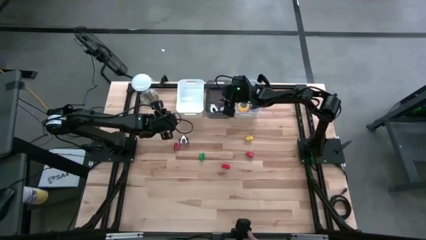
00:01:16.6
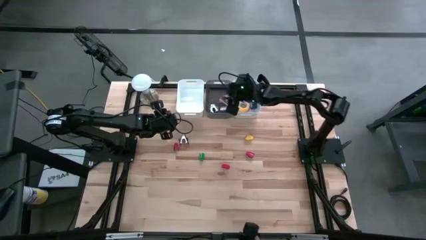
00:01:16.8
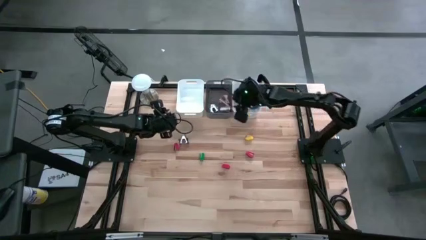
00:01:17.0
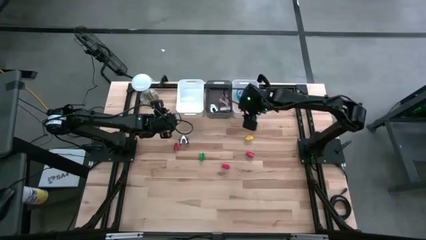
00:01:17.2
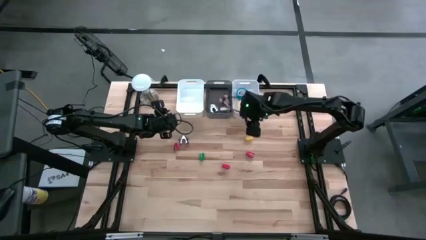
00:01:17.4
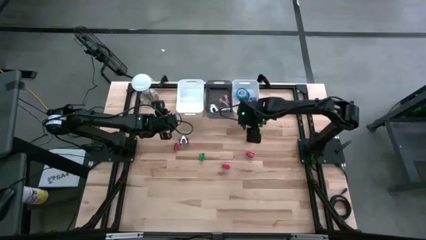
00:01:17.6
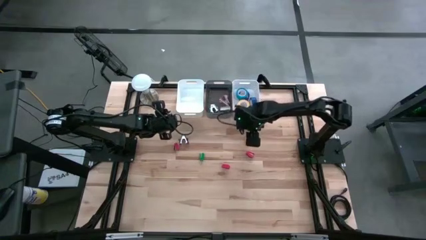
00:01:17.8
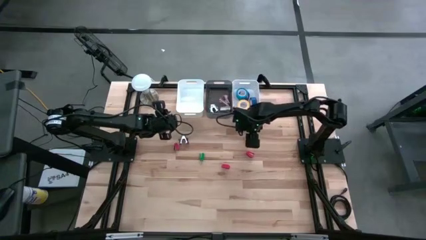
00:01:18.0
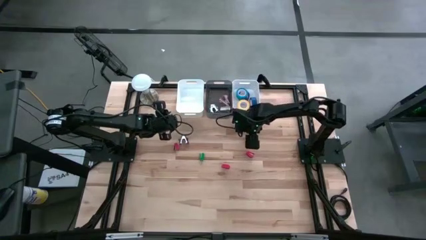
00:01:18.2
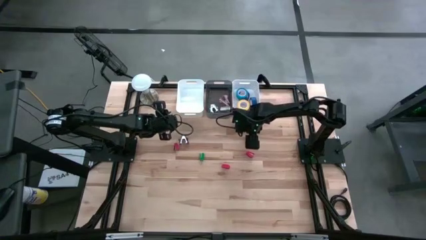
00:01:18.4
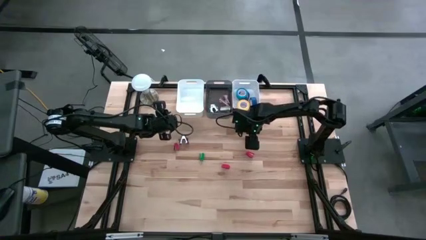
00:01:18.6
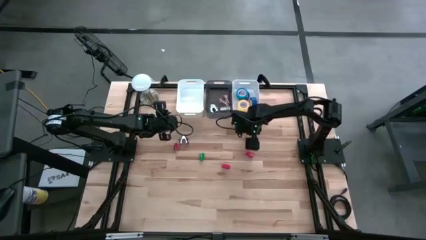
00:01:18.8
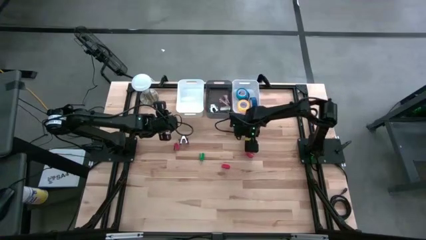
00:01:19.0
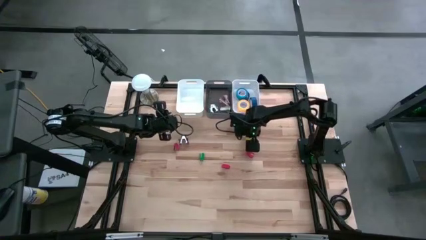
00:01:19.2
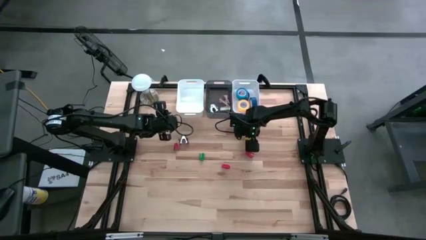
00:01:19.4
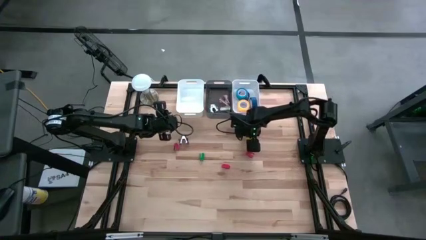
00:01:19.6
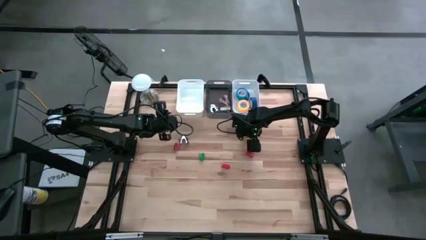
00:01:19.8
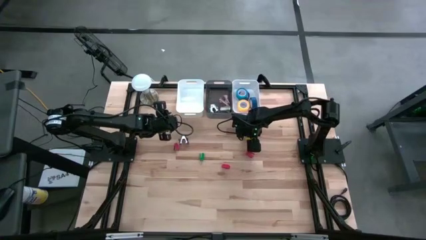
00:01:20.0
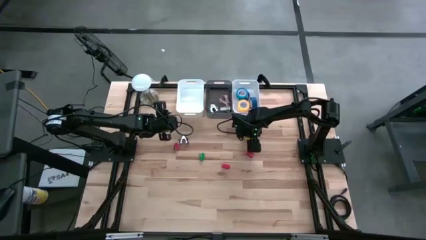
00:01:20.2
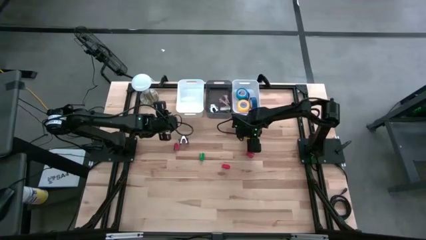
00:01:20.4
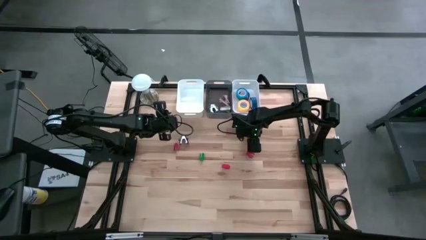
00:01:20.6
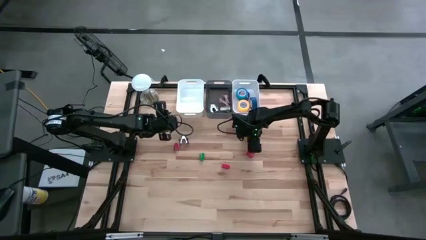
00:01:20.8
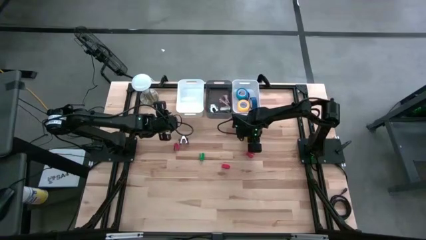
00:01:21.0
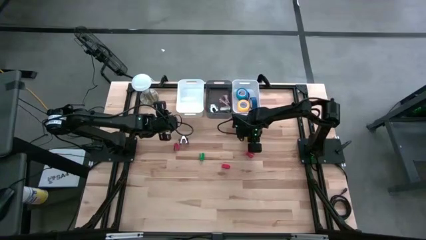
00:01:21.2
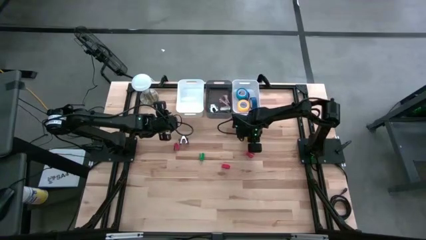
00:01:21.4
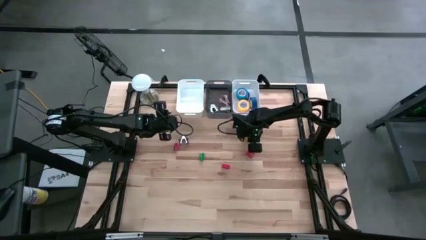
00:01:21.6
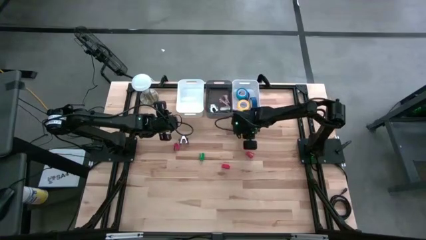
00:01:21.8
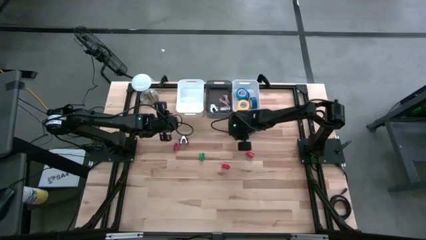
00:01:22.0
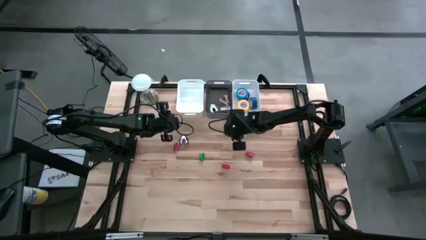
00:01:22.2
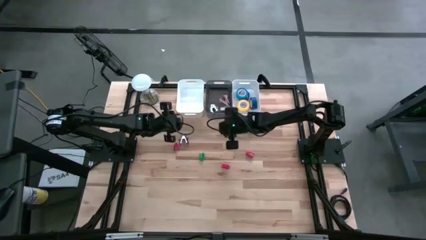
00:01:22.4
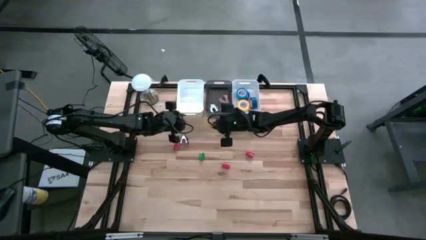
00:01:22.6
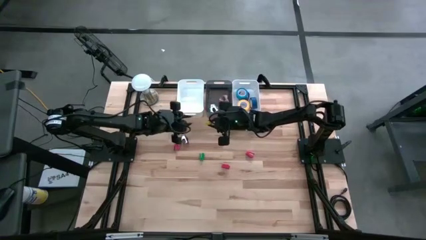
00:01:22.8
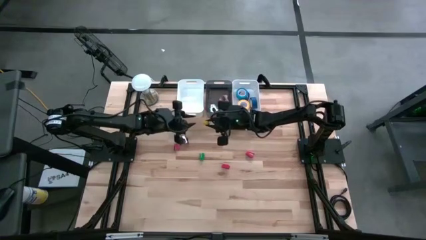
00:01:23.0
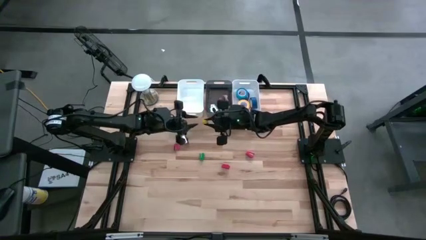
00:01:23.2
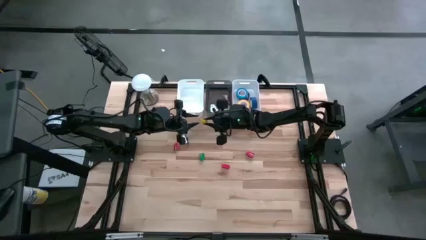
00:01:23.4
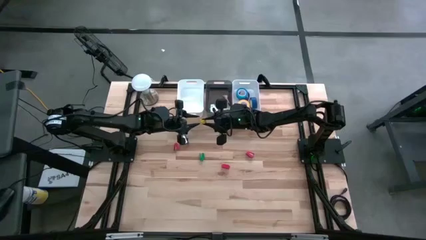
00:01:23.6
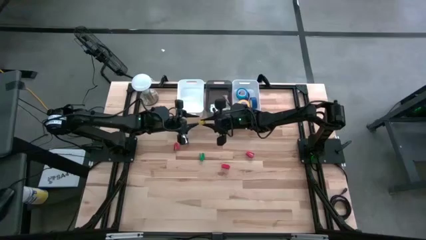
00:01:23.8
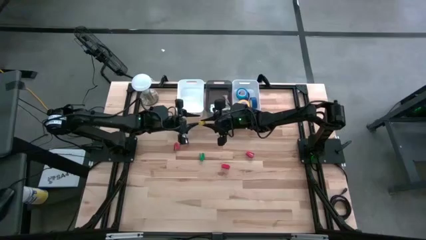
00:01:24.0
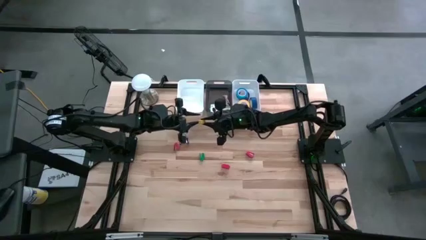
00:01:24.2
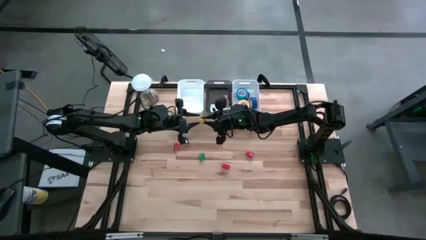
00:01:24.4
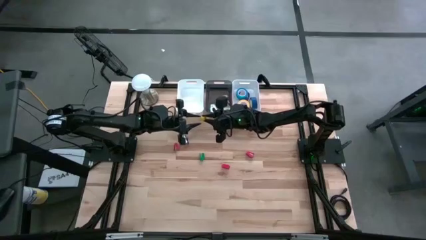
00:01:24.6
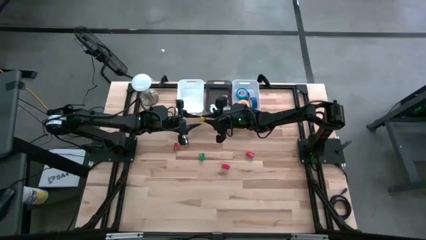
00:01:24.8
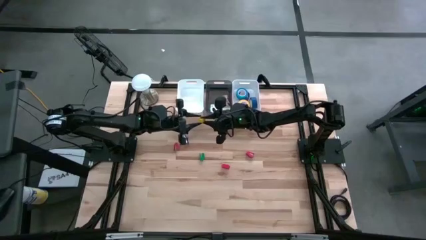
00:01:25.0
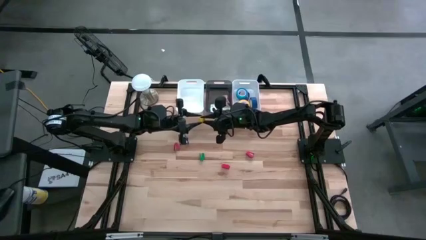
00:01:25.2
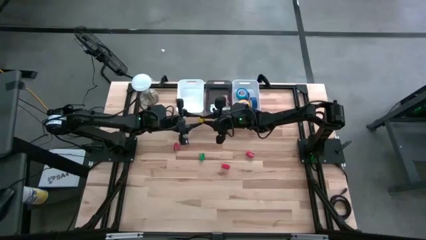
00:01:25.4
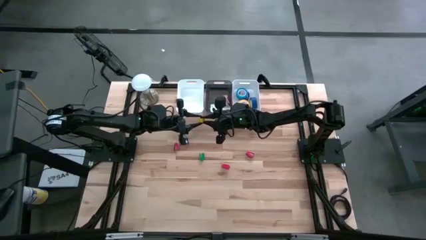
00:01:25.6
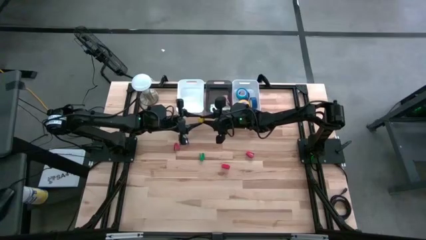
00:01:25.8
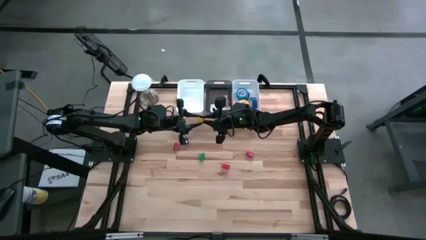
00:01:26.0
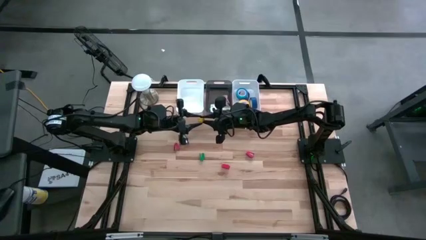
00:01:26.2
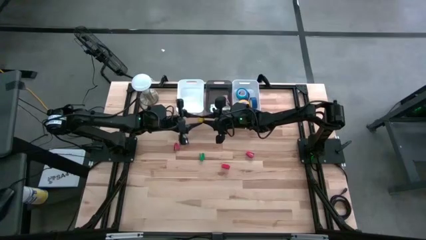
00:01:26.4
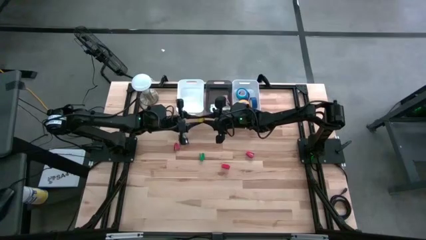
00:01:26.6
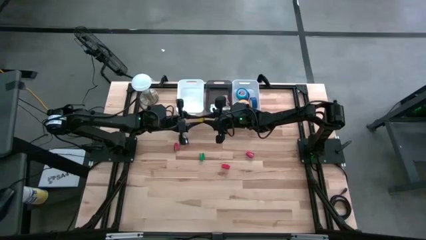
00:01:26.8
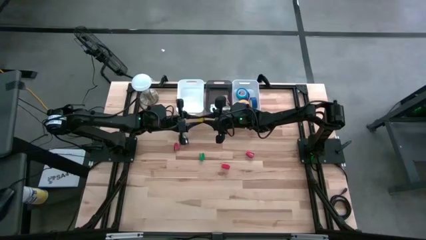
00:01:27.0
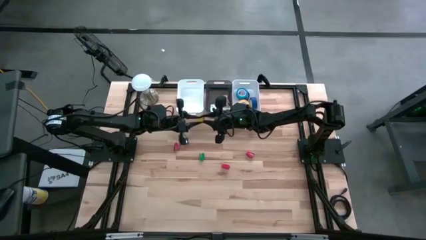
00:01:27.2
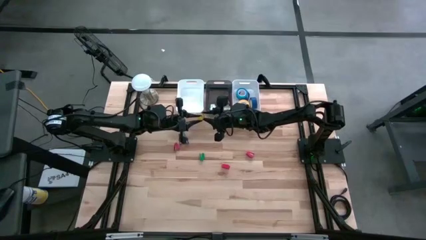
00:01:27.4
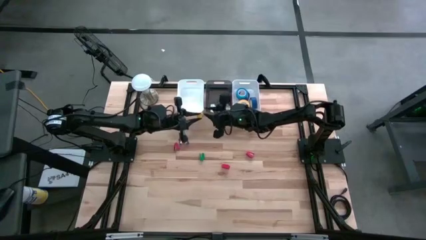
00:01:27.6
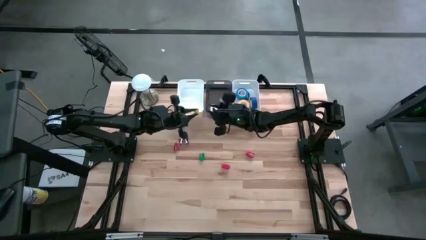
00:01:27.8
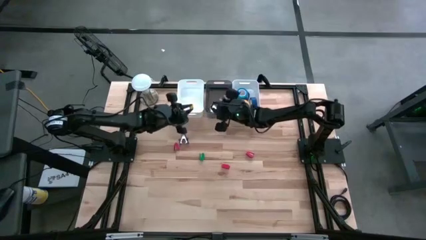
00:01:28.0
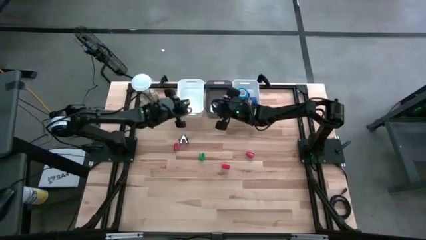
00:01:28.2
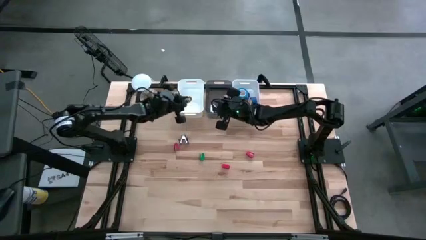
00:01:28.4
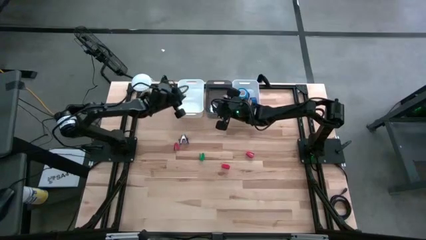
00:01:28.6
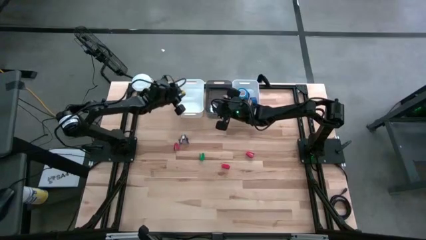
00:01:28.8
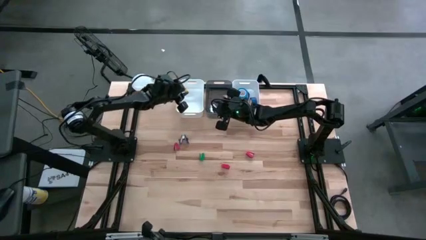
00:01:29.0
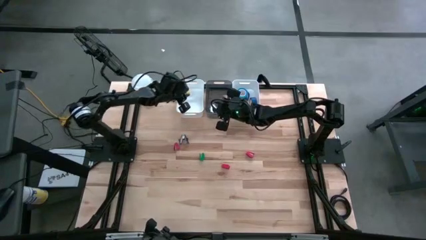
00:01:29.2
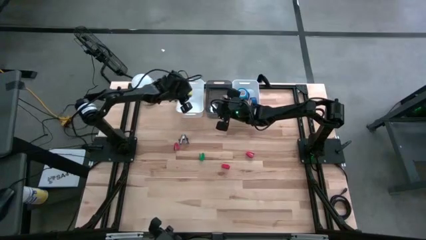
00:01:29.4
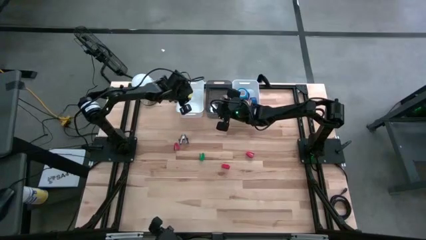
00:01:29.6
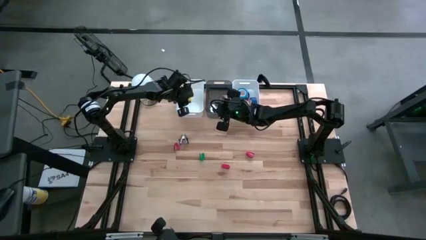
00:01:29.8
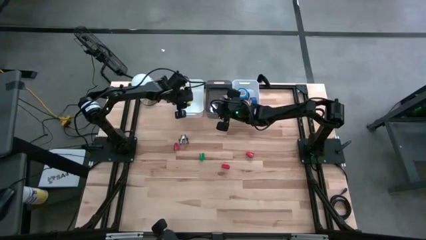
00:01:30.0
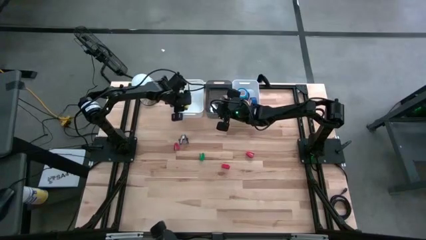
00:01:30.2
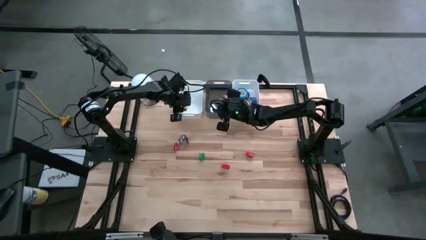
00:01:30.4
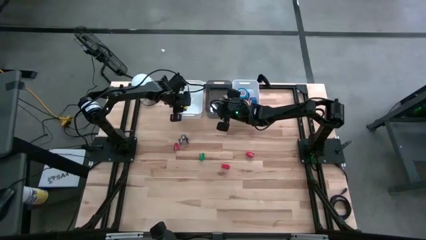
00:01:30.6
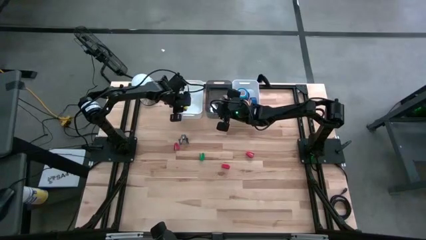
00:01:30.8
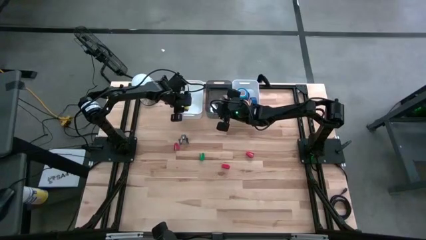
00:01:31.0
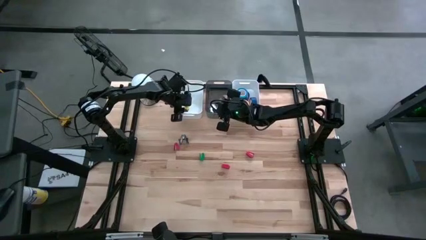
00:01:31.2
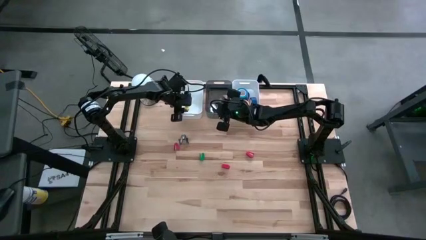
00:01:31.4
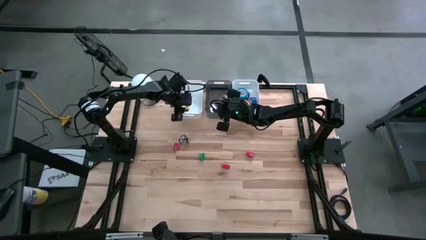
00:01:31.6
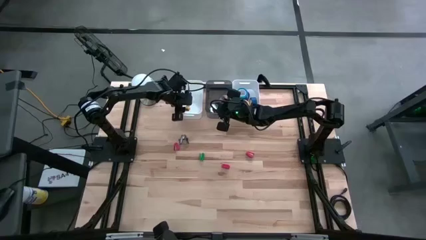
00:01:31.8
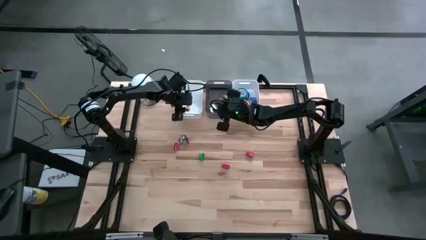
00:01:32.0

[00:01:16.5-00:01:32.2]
Task: Pick and place Stapler, Stapler remover, tape
Put the yellow stapler into the left white bin

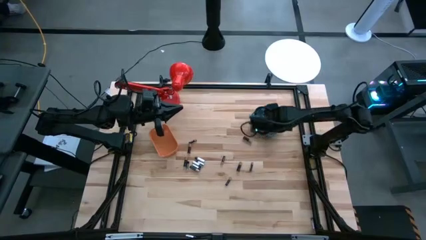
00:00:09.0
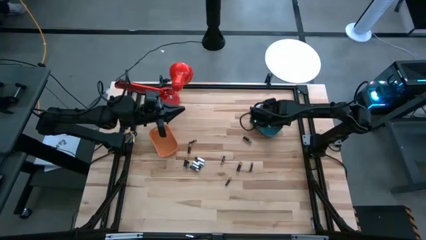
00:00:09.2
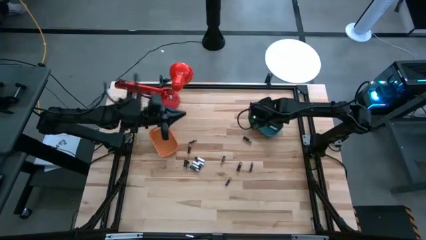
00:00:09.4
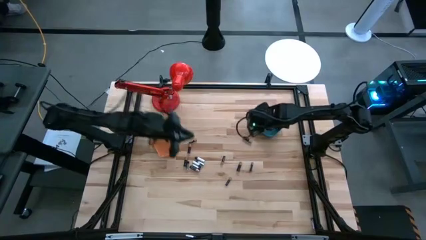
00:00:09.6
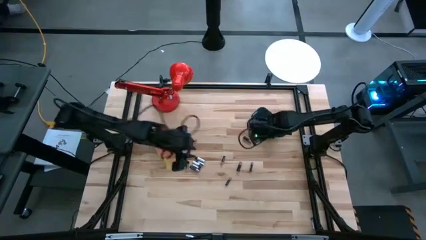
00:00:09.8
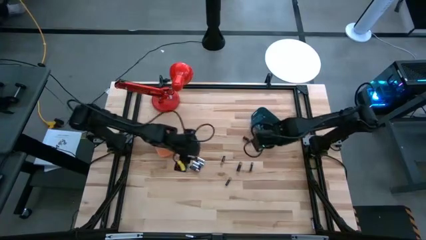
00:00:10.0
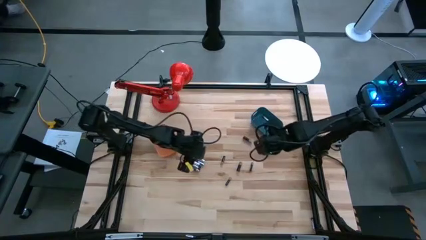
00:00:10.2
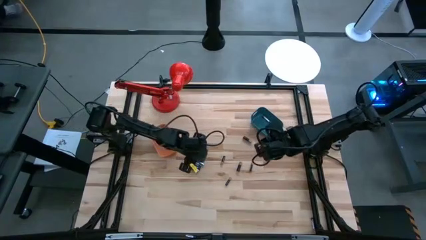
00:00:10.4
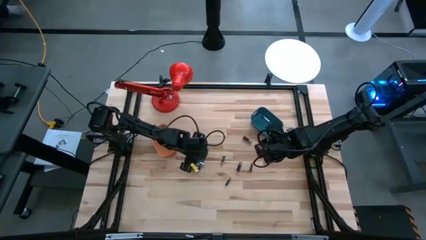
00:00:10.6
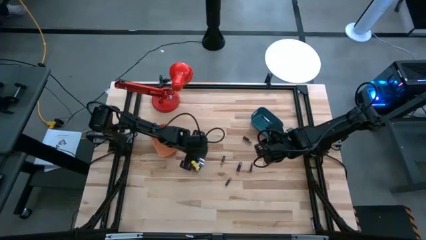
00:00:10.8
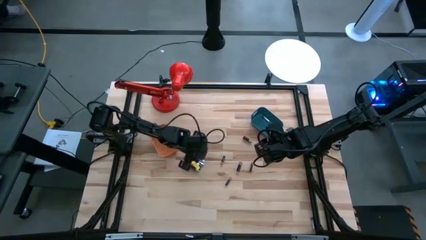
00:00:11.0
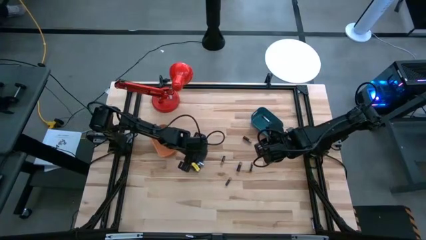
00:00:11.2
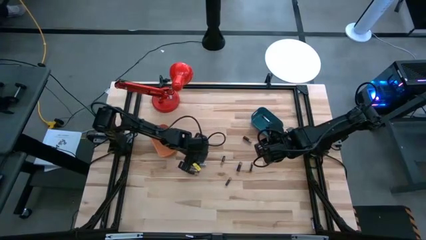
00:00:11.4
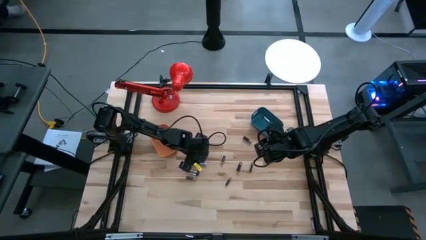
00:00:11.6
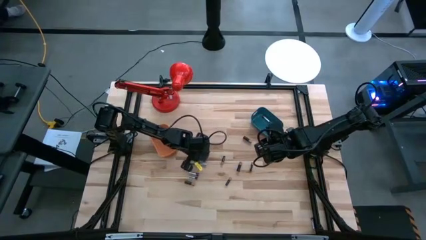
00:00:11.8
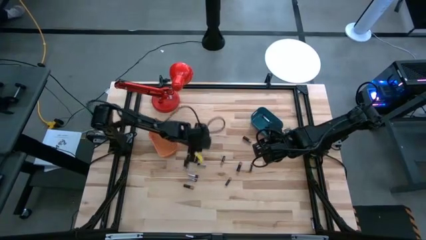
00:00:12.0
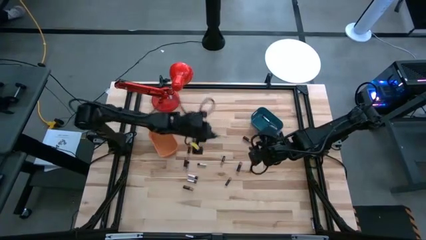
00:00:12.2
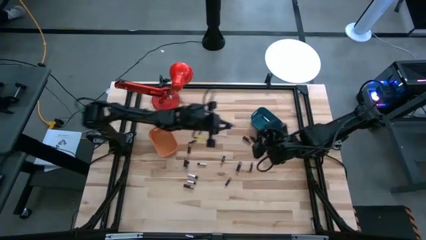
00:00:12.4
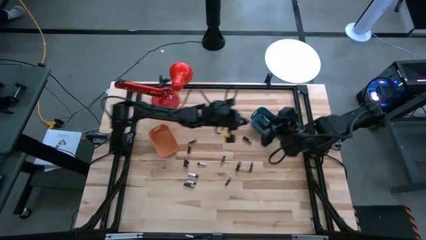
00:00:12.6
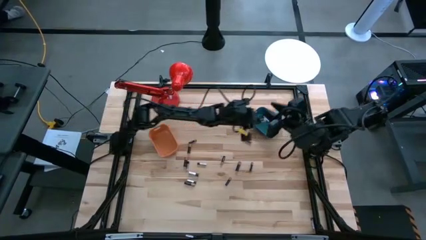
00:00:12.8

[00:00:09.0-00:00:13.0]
Task: Sort batteries
Put the silver battery into the blue bin
